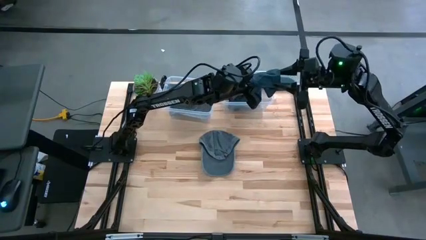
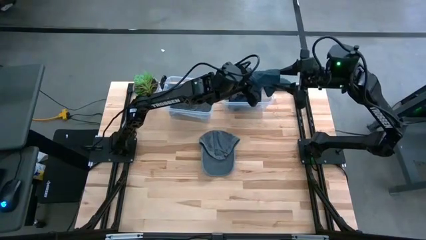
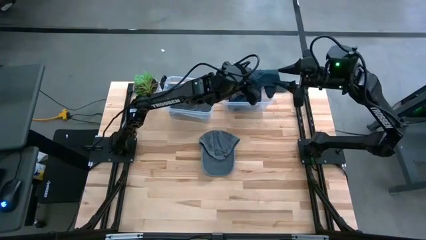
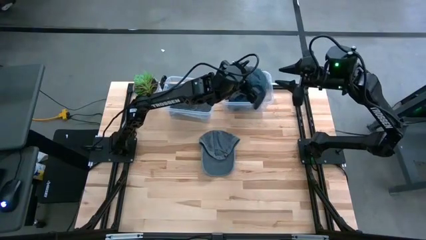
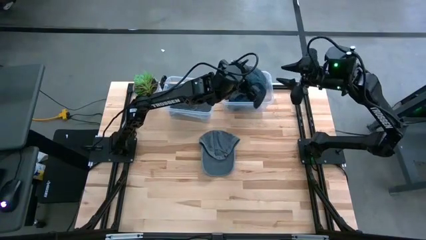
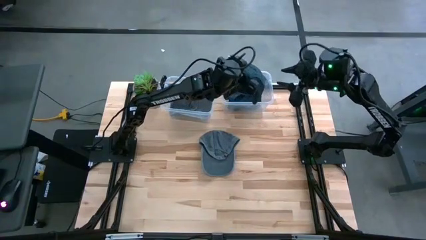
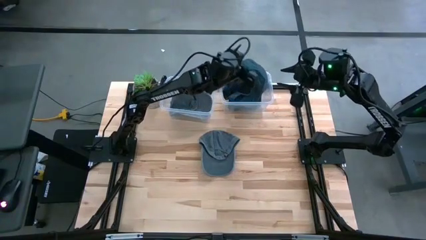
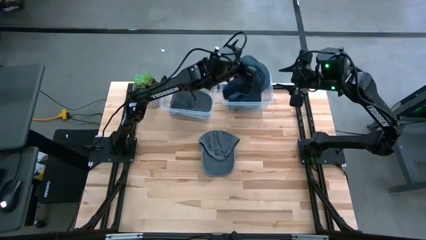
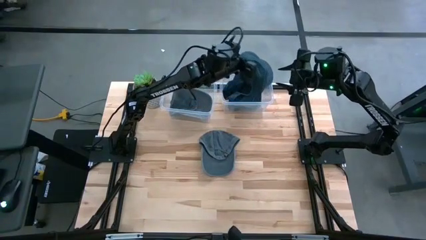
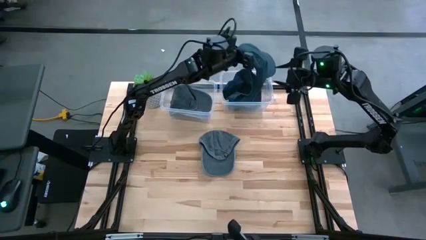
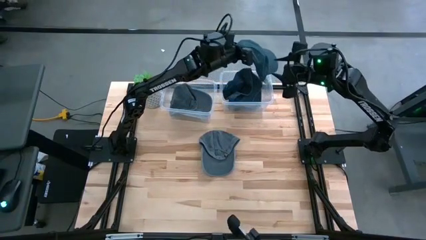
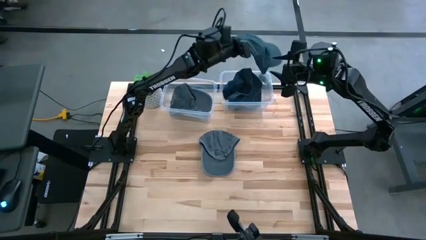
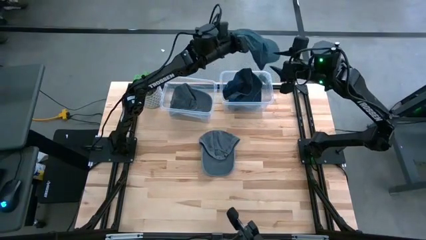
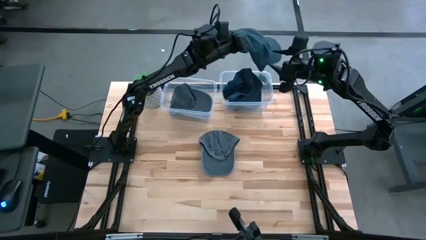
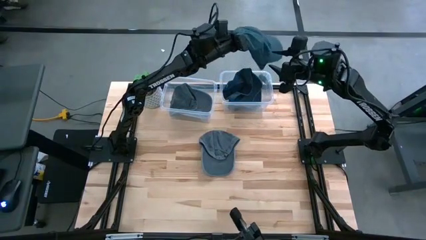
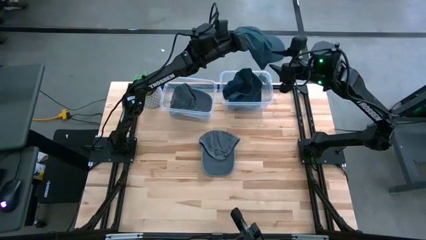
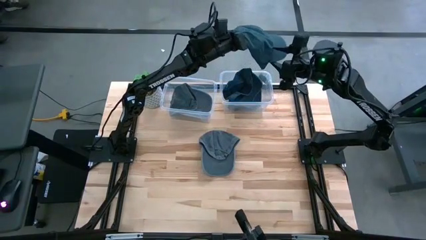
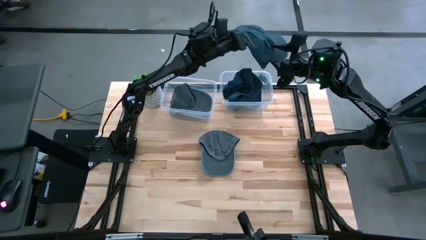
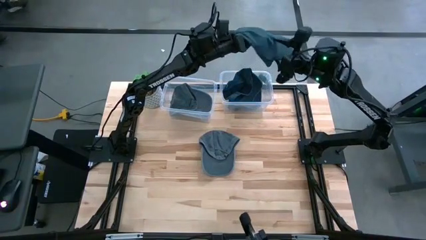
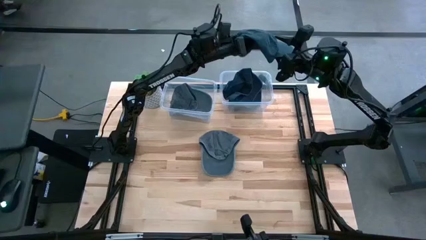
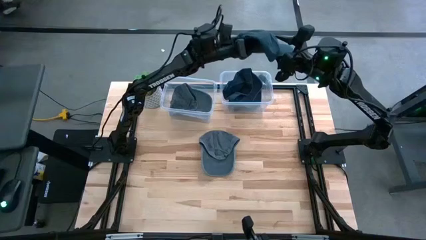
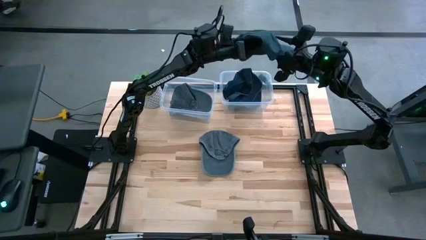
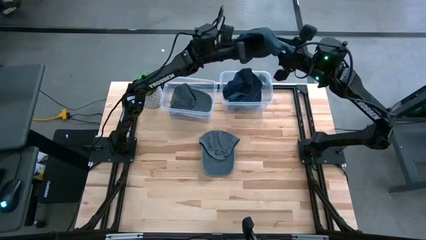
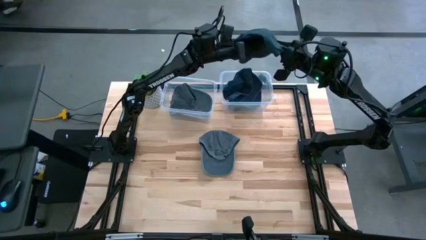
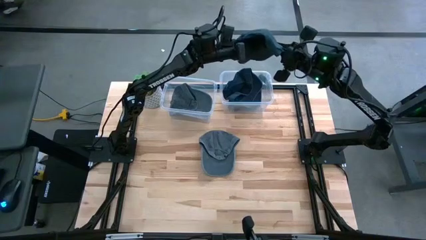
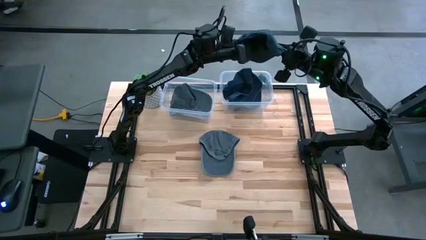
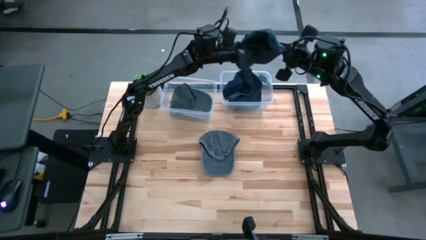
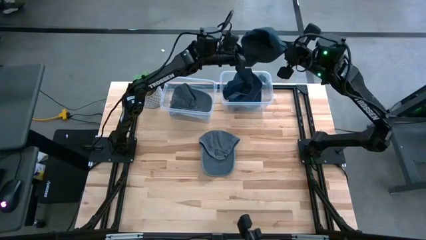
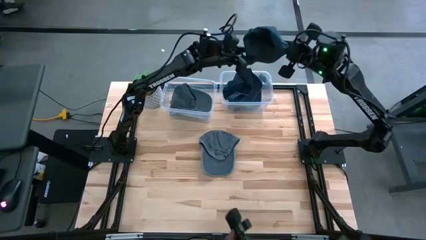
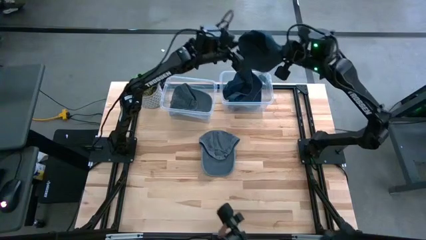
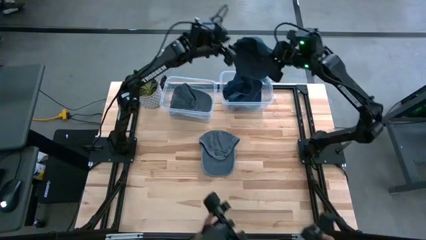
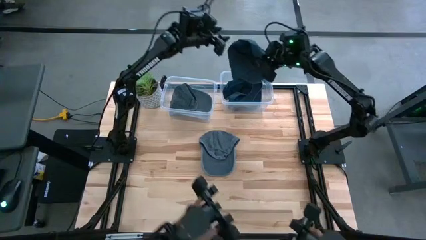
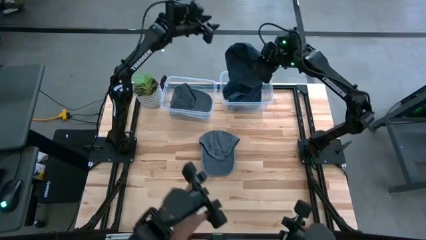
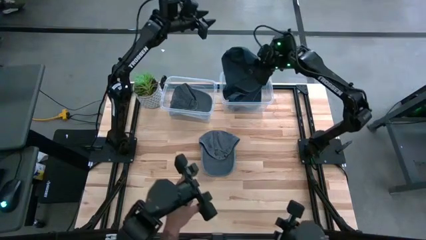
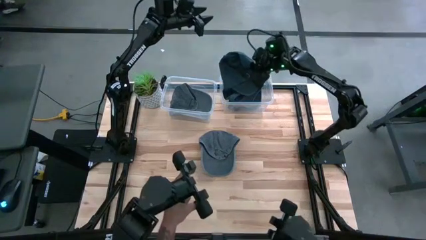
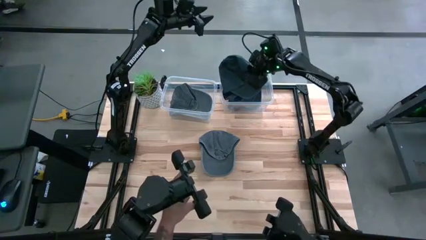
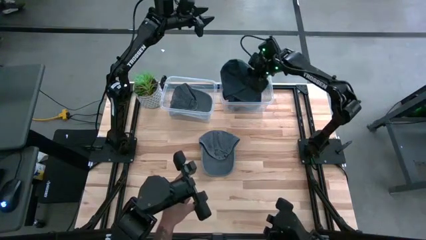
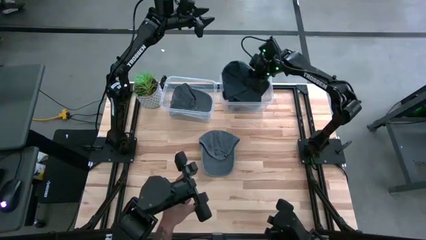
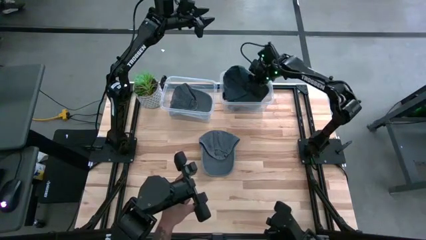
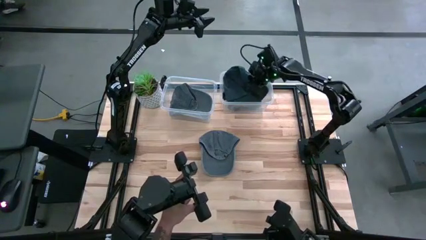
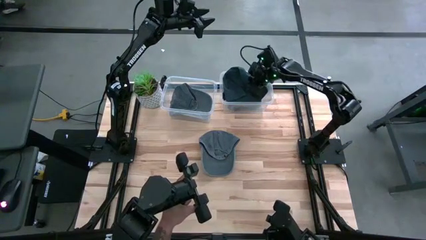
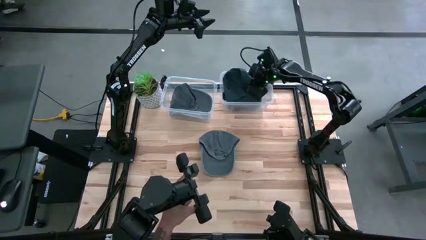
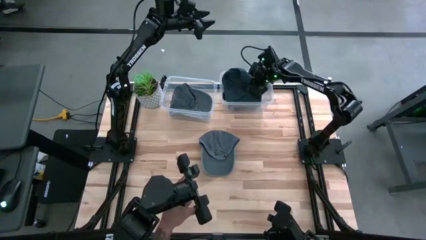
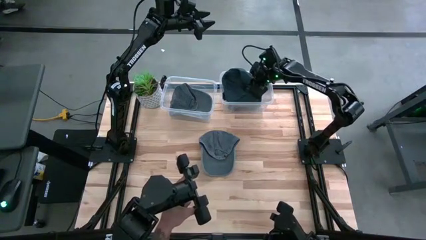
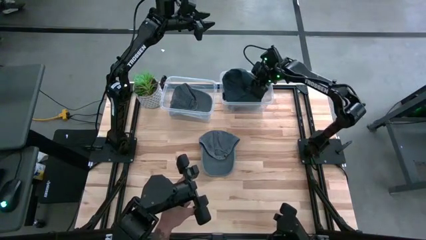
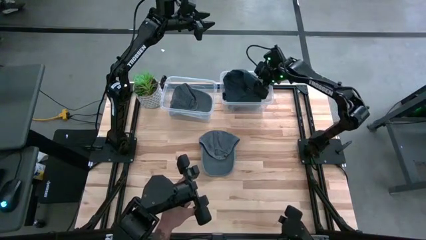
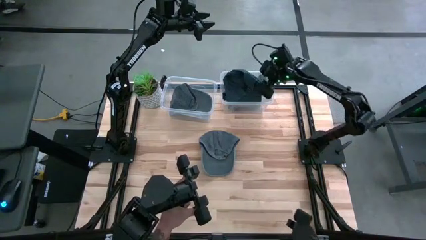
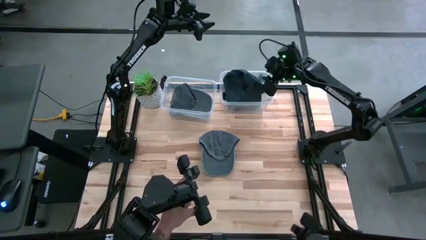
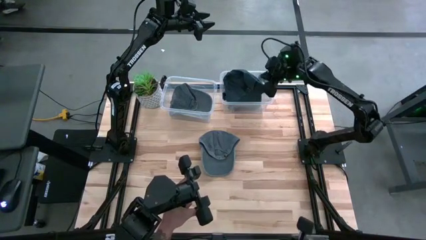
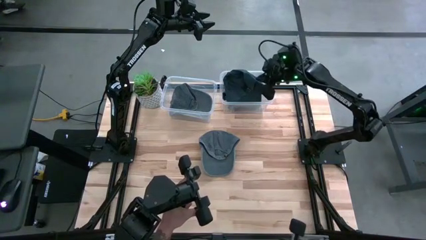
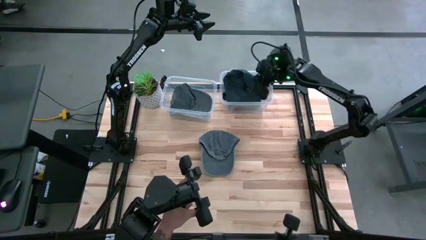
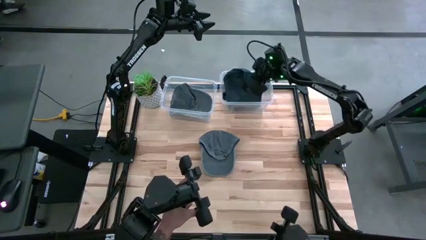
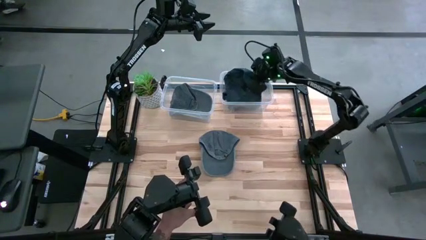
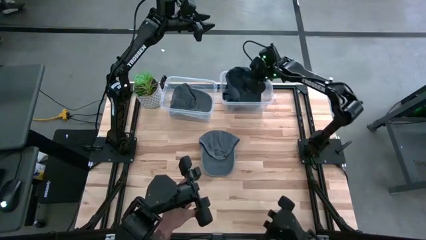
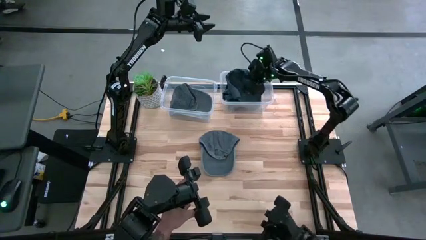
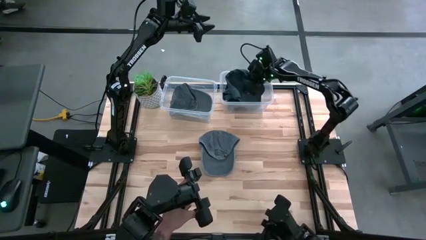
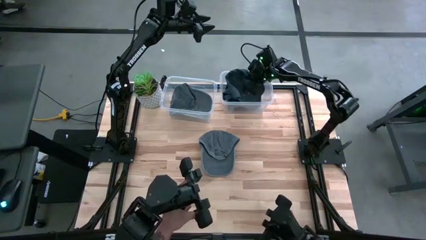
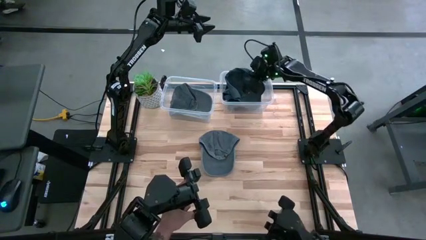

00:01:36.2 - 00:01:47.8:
Task: Pick & Place hat
Put the blue cap into the right transparent bin

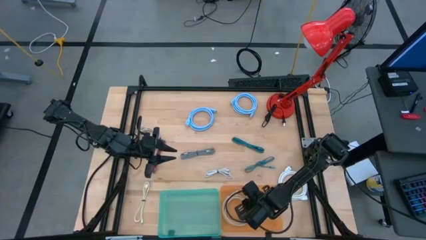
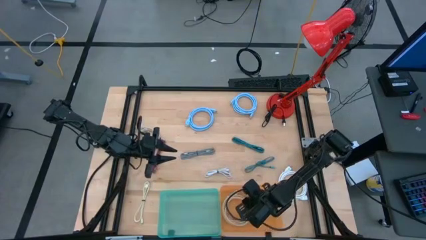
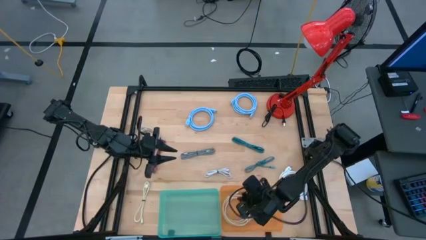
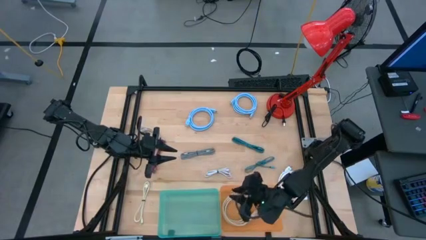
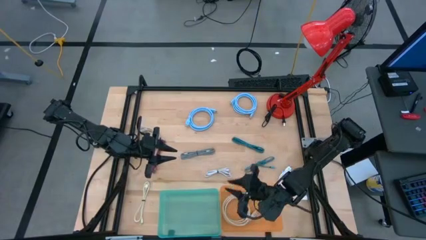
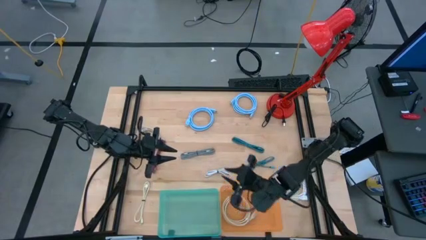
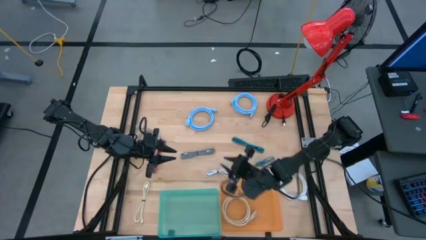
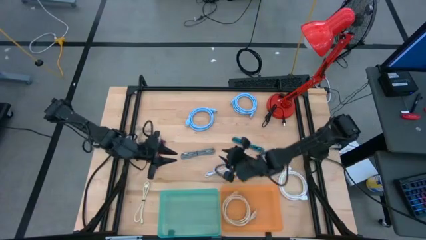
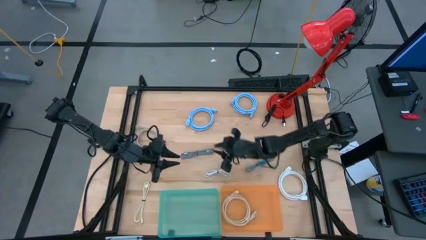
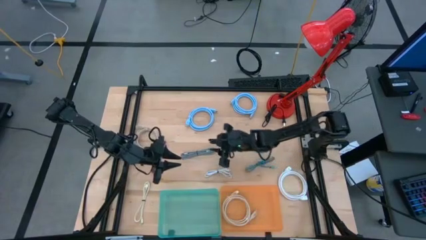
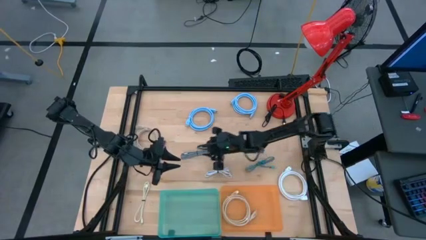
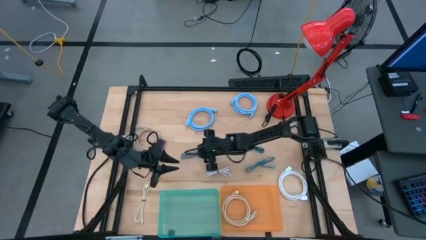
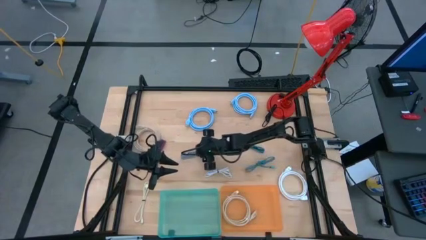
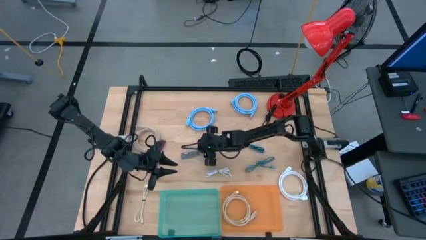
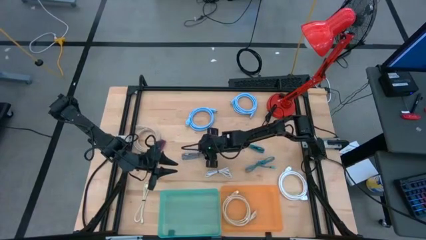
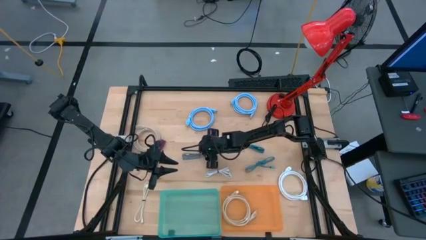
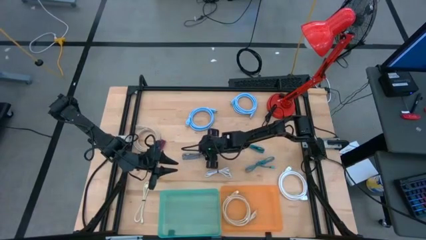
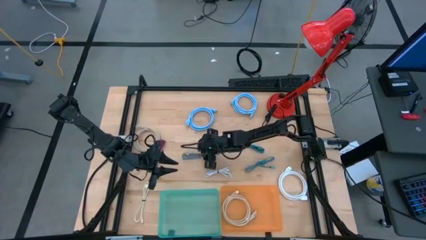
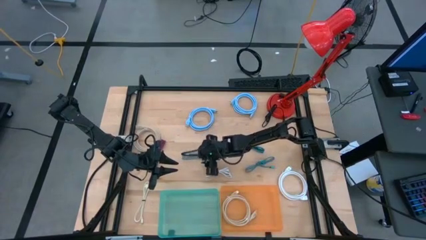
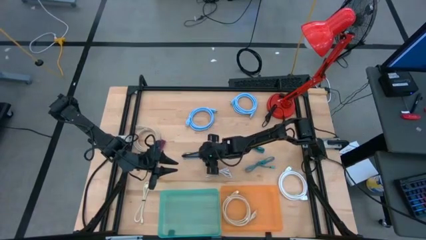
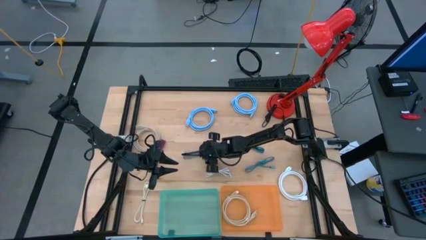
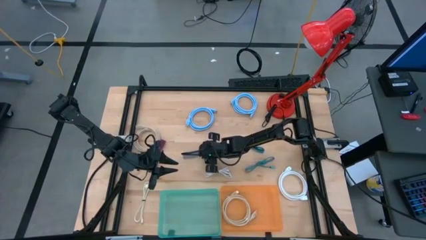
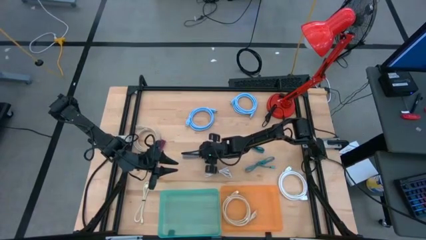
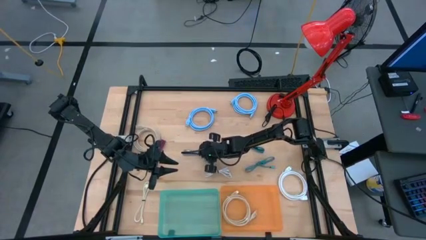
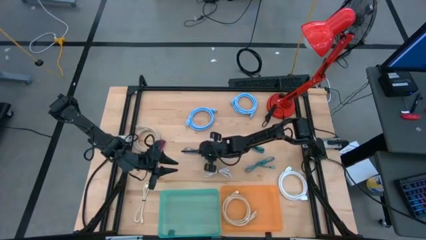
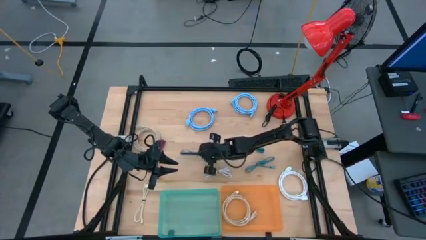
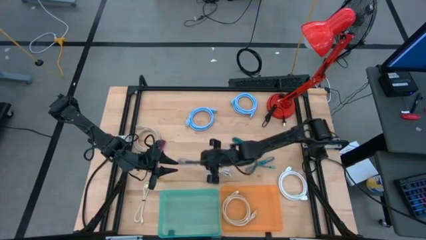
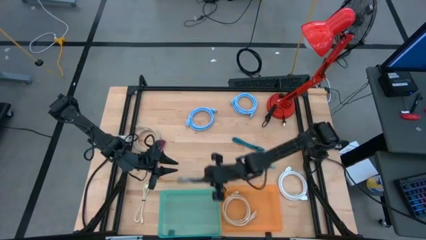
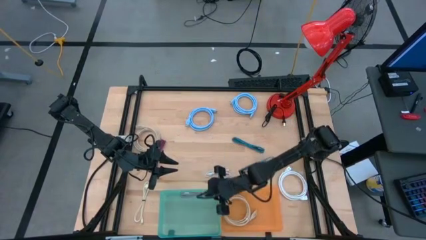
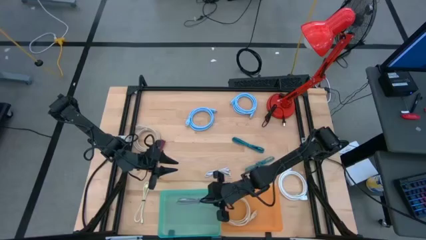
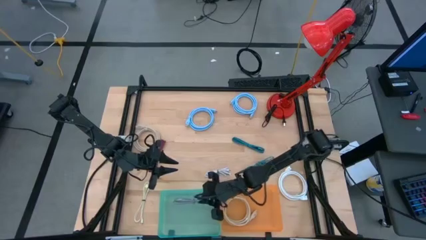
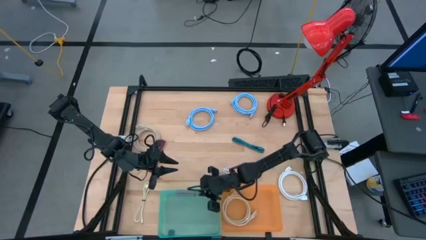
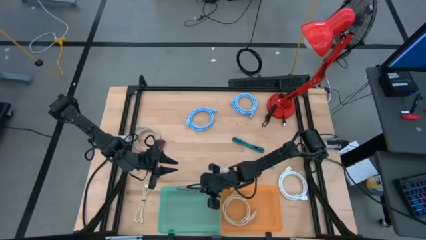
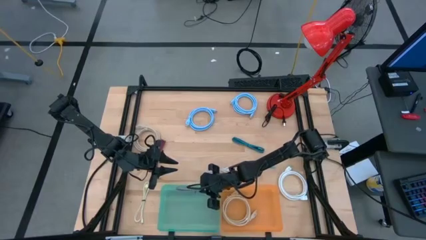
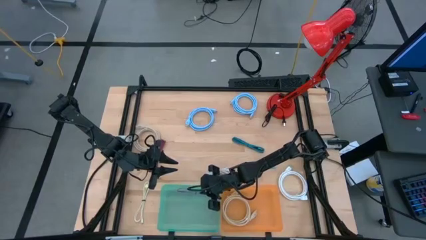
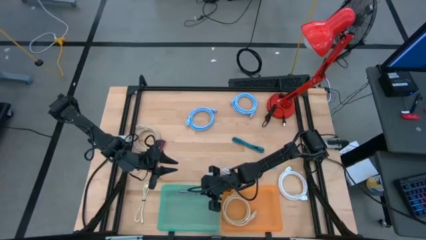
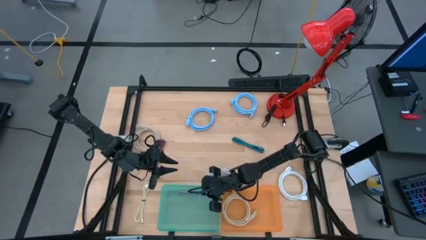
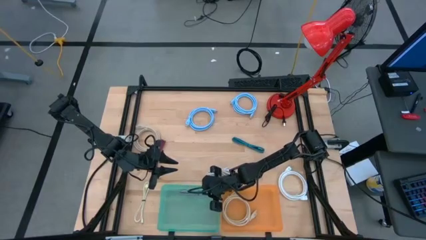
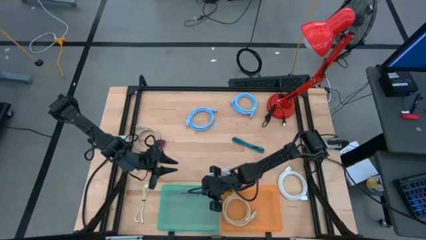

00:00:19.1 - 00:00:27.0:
Task: Pick & Place USB Port
Put the white patterned charger cable into the green bin
